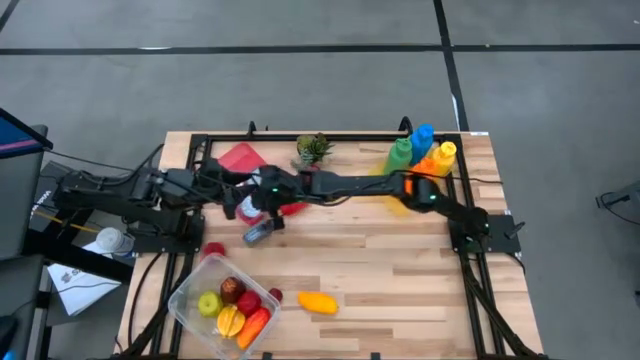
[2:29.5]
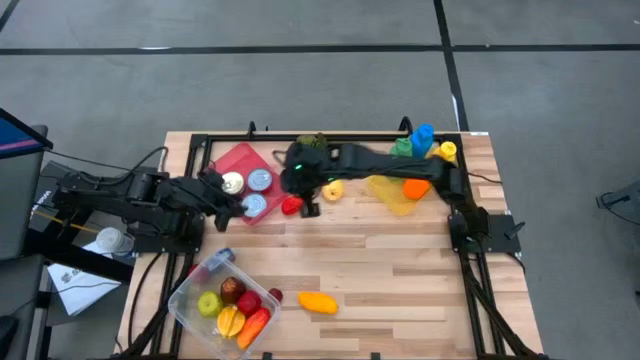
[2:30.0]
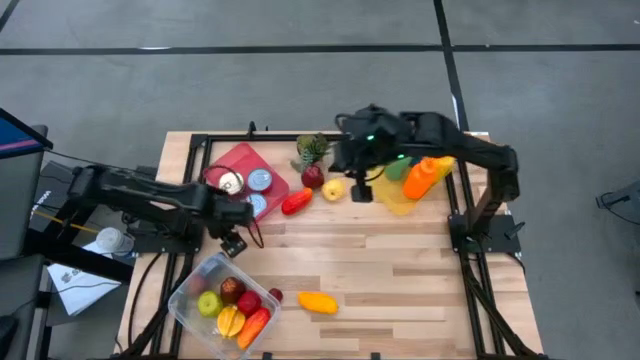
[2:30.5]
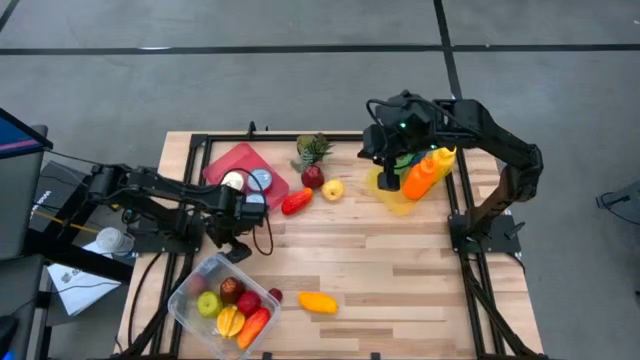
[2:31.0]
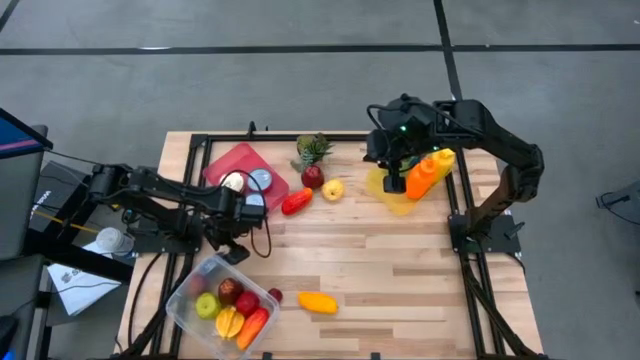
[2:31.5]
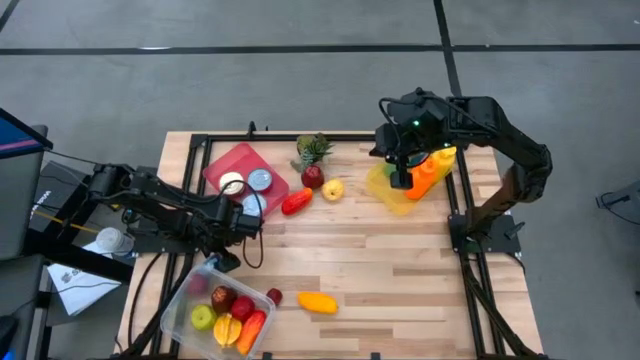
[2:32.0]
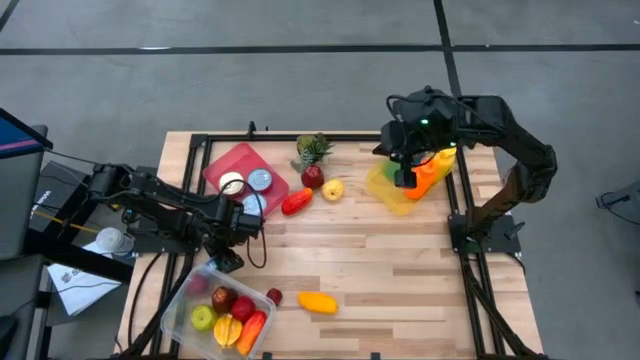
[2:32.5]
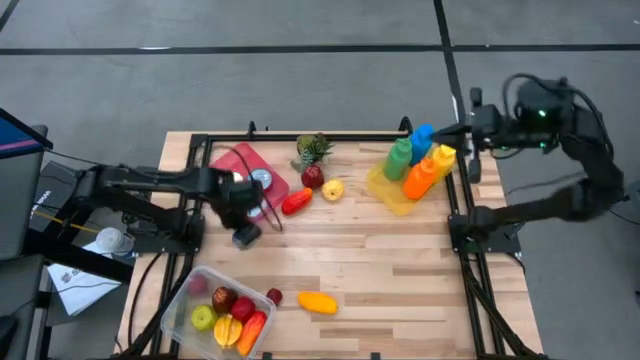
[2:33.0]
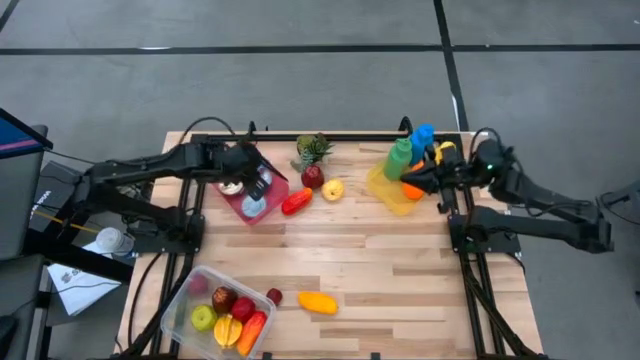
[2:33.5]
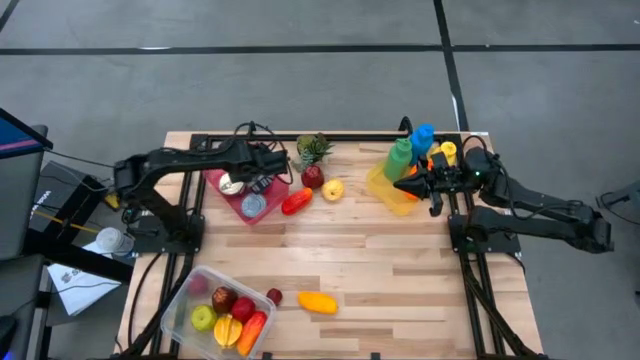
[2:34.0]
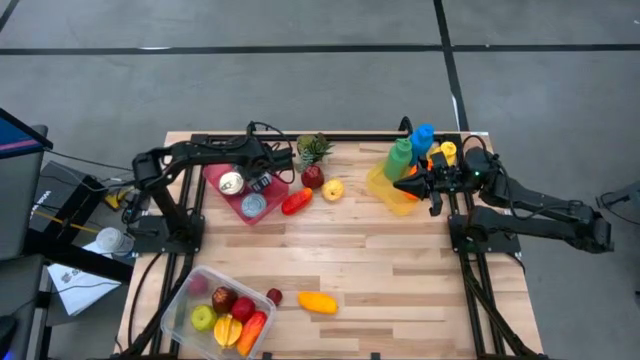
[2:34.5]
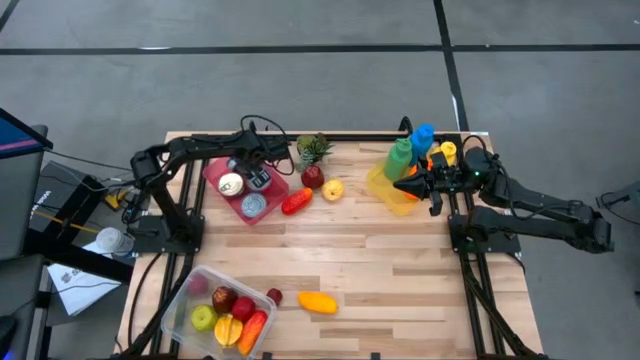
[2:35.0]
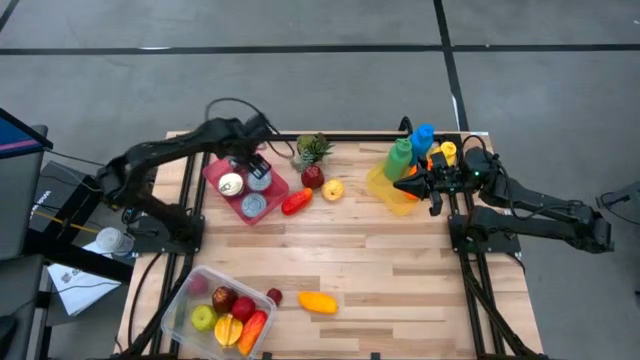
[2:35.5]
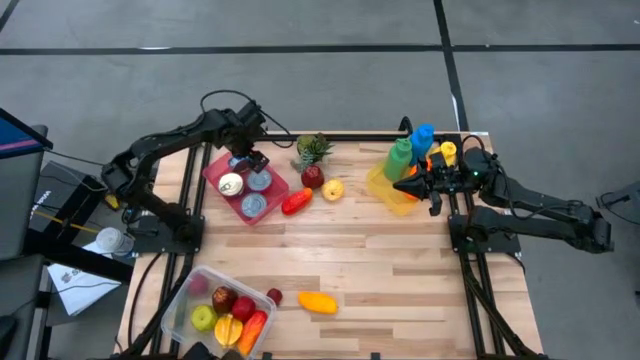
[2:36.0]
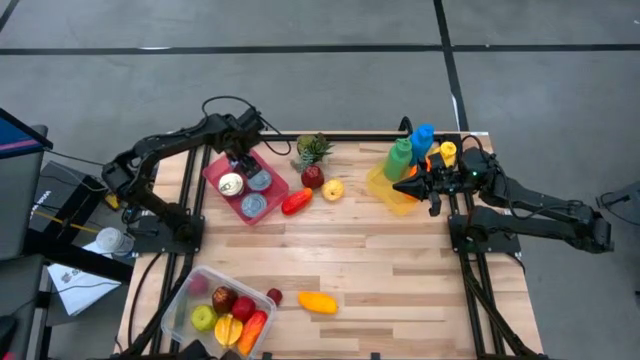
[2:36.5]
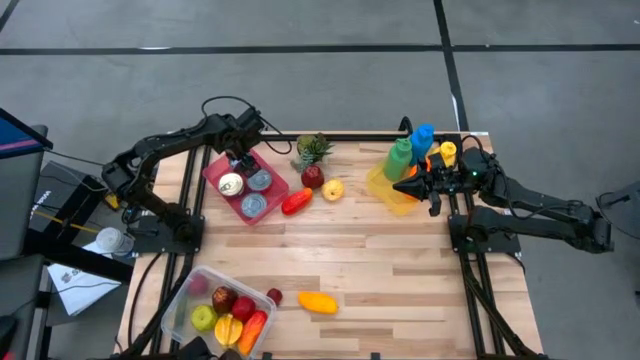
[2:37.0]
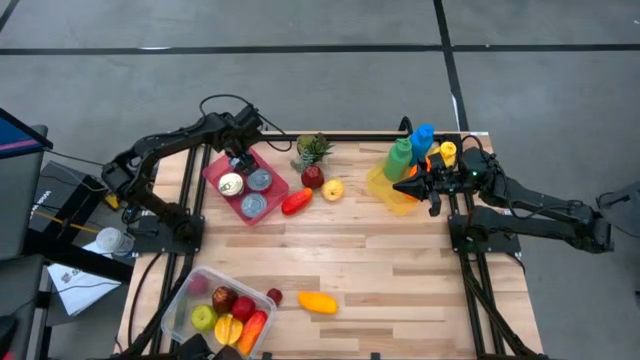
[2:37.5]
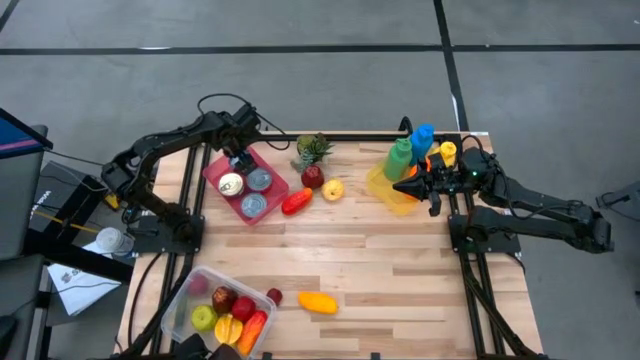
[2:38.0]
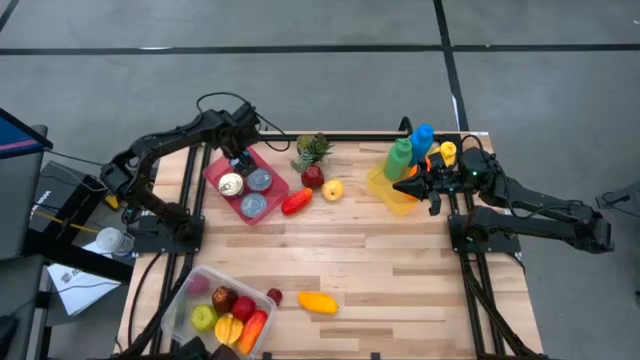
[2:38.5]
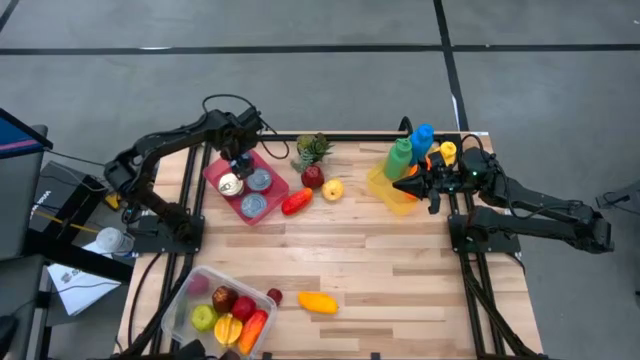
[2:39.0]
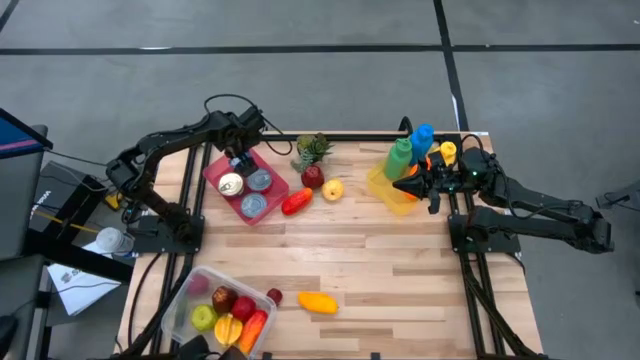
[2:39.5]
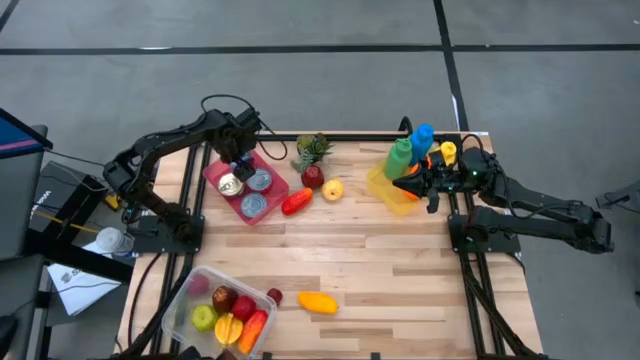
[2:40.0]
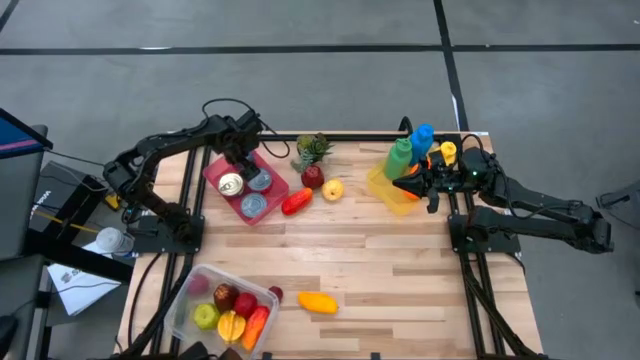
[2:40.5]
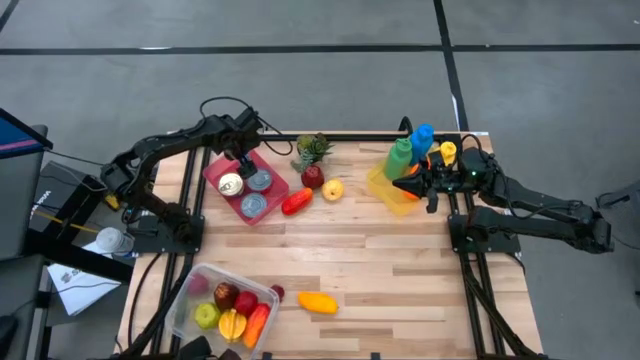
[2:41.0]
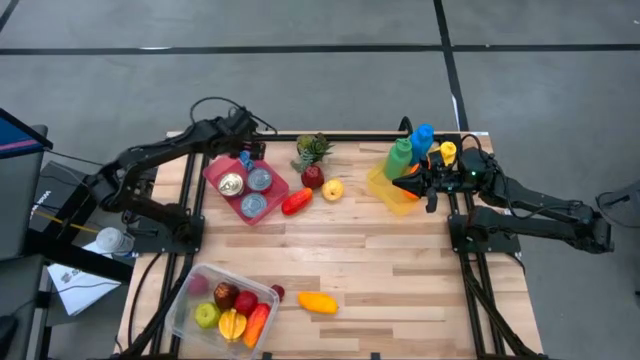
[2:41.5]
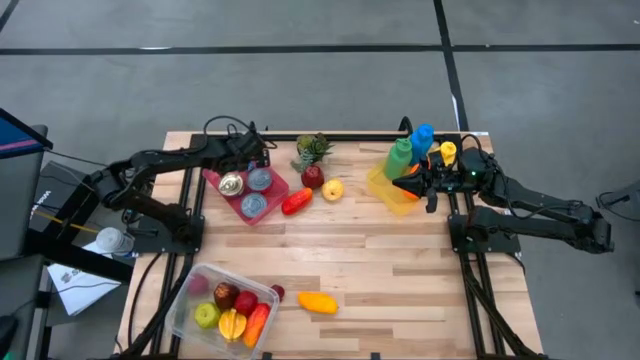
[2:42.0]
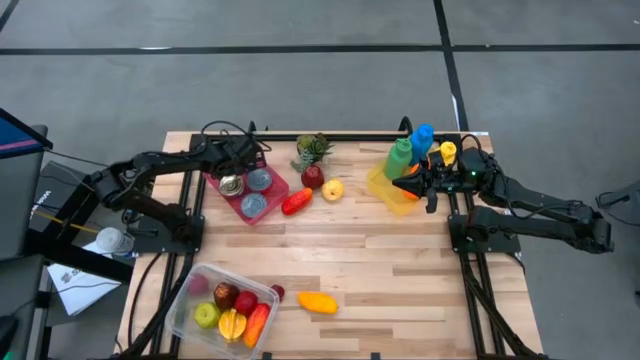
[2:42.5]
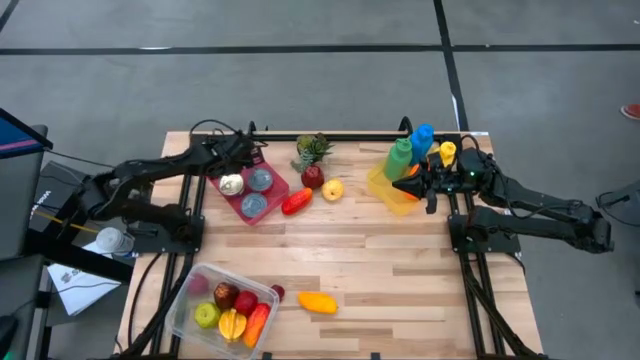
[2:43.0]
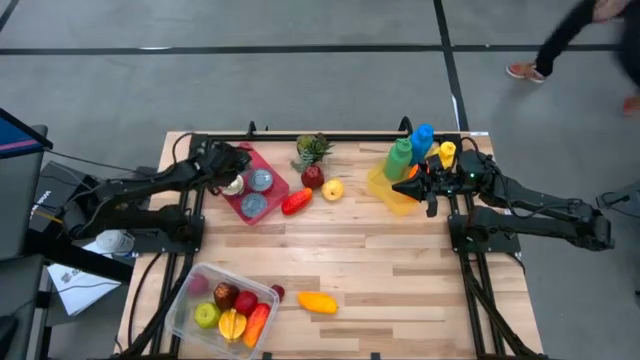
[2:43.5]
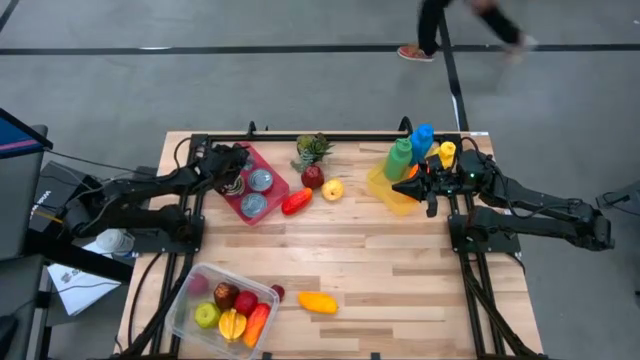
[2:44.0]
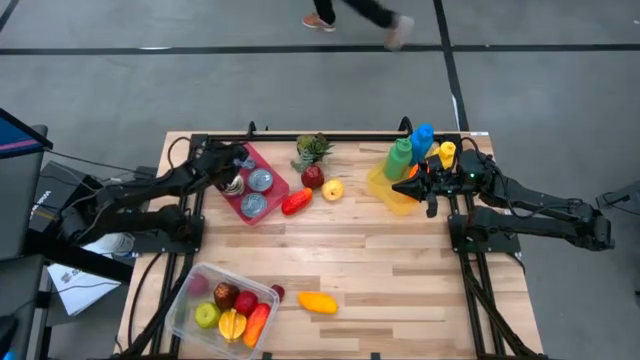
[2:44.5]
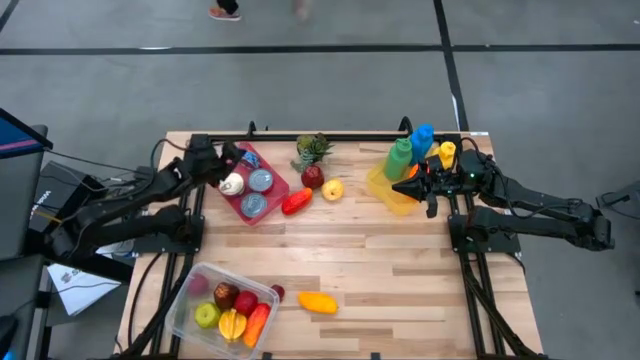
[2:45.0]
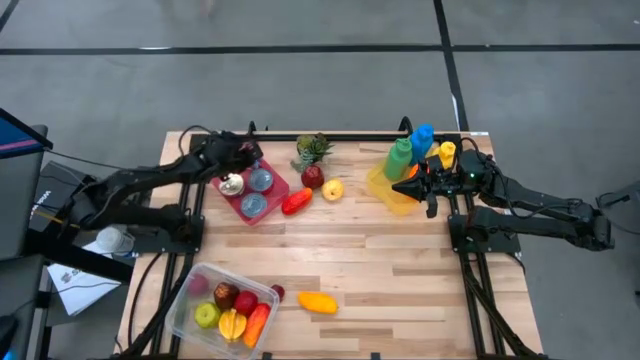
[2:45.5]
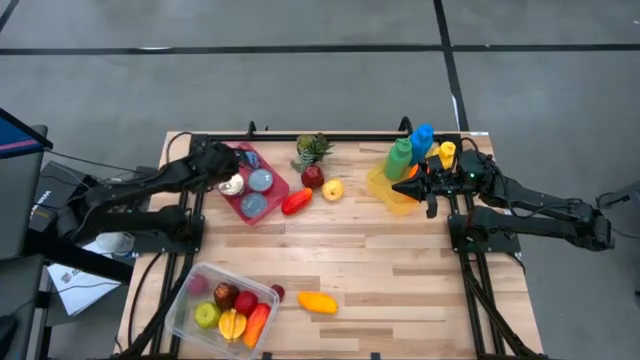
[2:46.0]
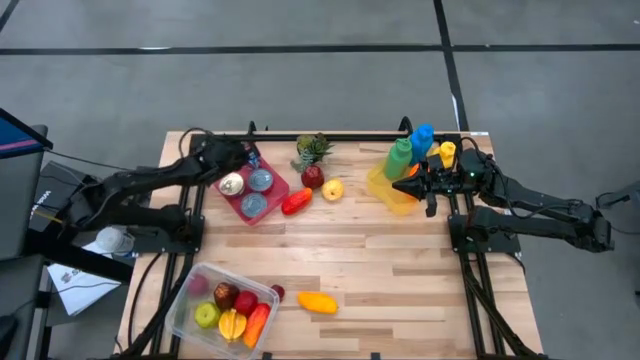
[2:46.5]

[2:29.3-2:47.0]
Task: Pick & Place Food Item
Put the blue tuna can into the pink bin

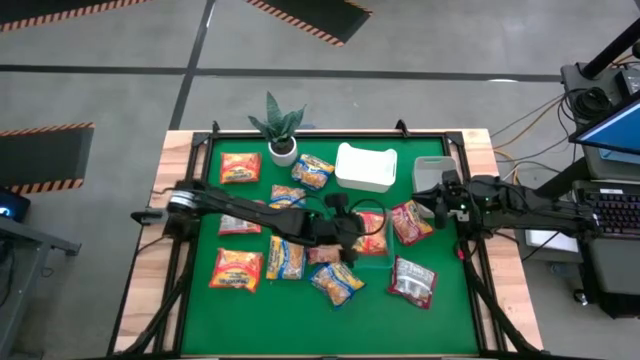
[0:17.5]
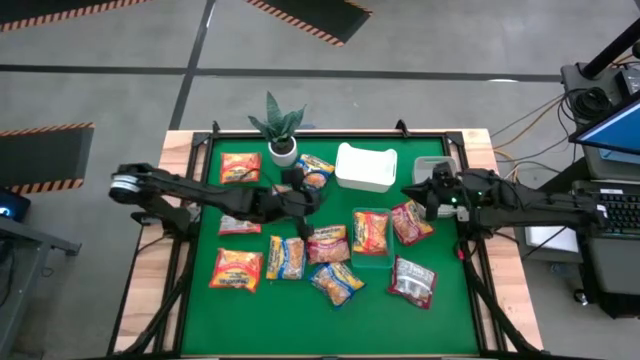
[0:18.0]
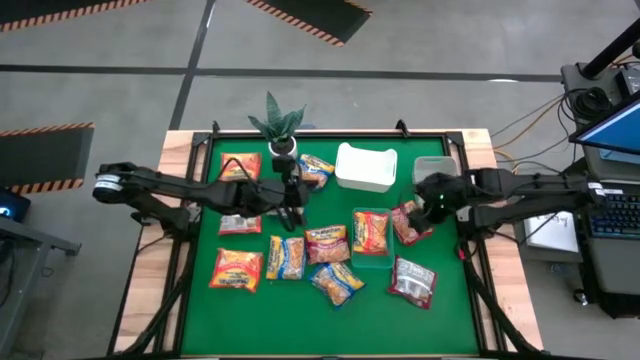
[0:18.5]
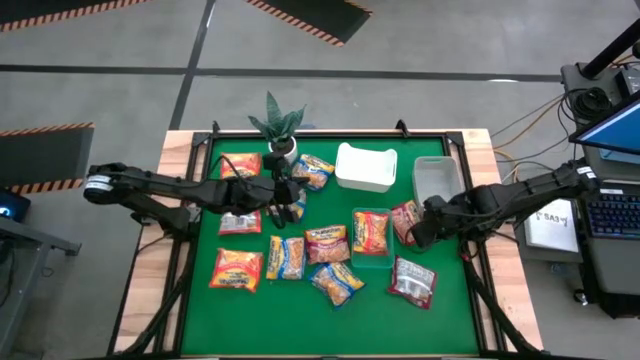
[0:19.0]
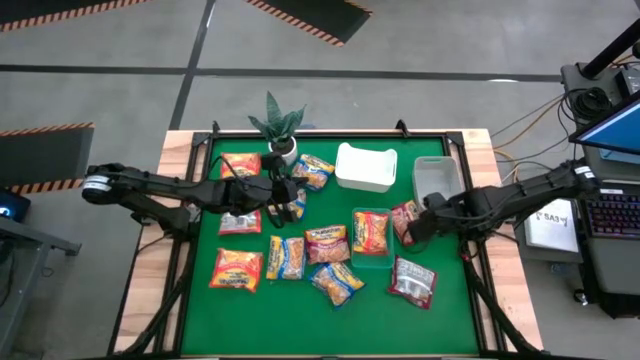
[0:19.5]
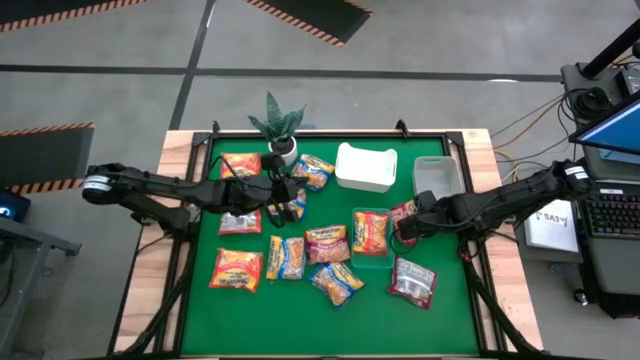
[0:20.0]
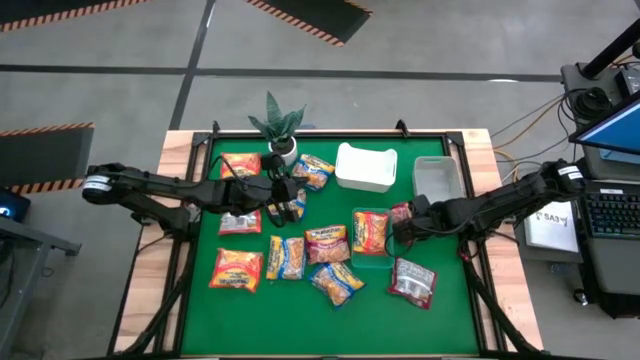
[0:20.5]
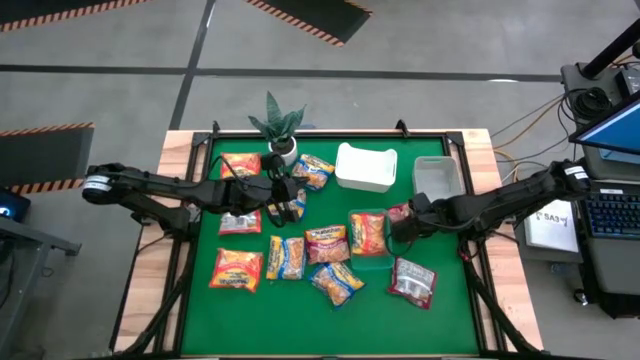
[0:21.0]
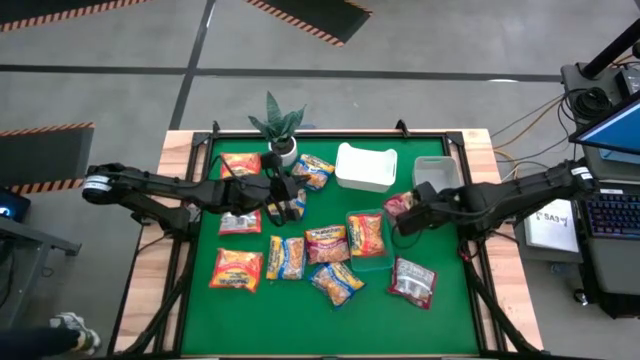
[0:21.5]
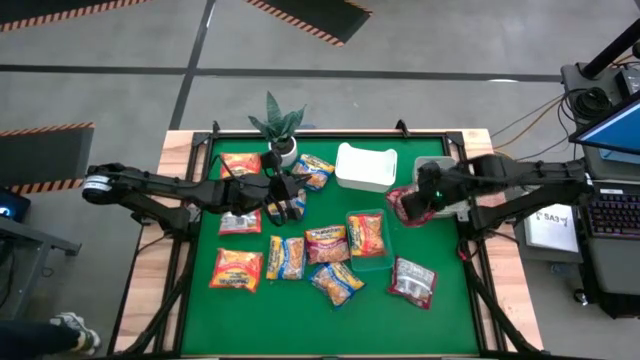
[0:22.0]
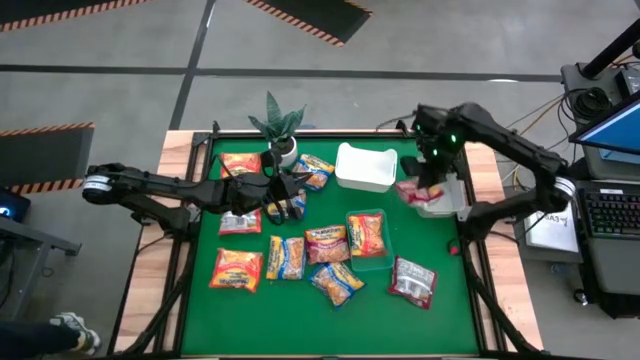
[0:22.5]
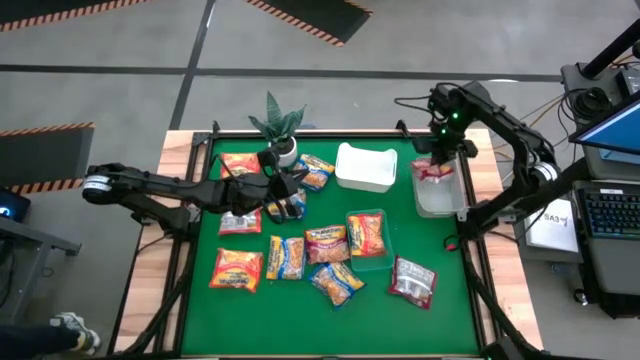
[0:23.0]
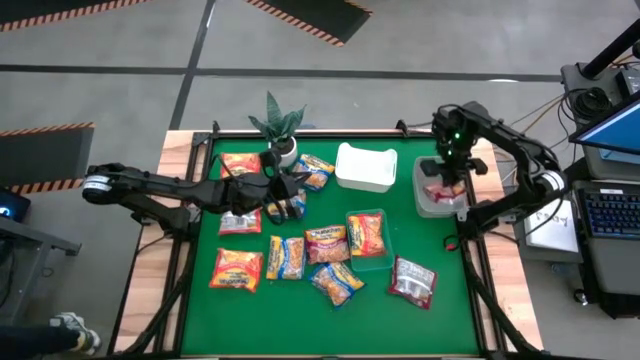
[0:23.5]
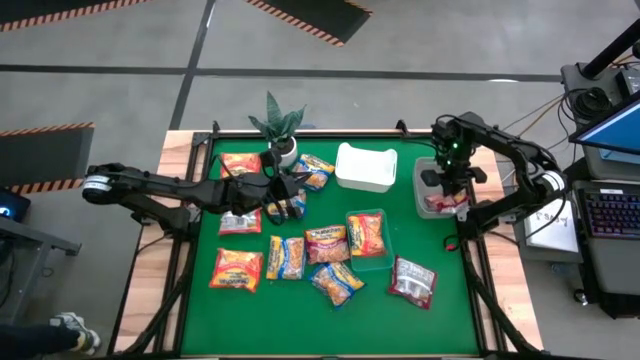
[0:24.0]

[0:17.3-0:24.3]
Task: Sort Maruchan noodles
Put the red noodle pack into the gray bin
